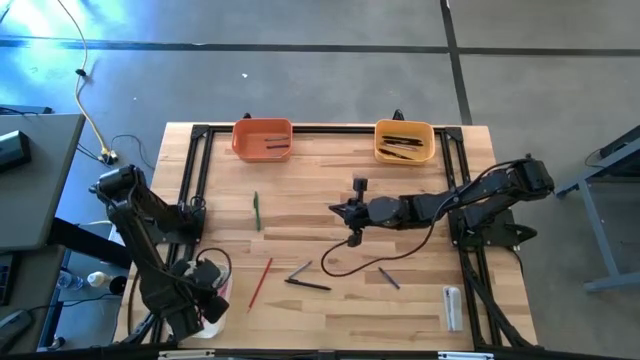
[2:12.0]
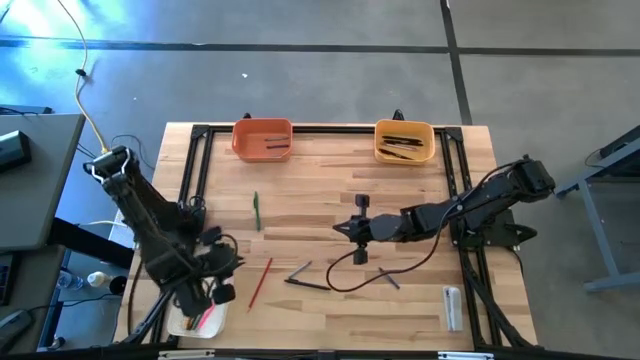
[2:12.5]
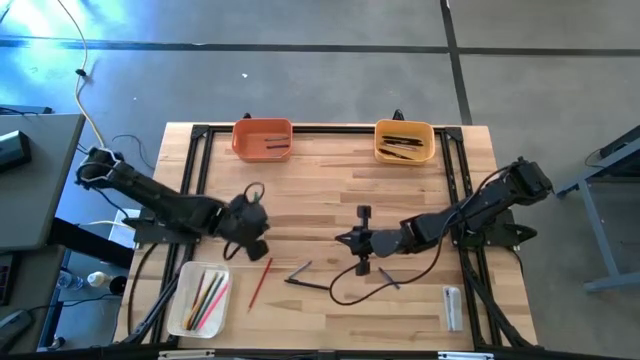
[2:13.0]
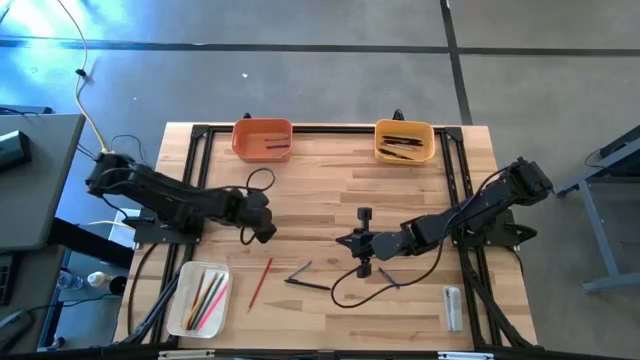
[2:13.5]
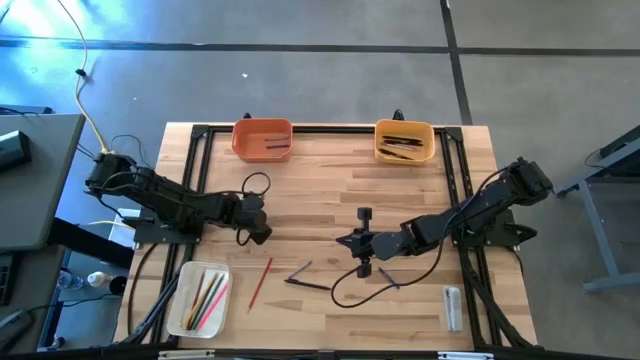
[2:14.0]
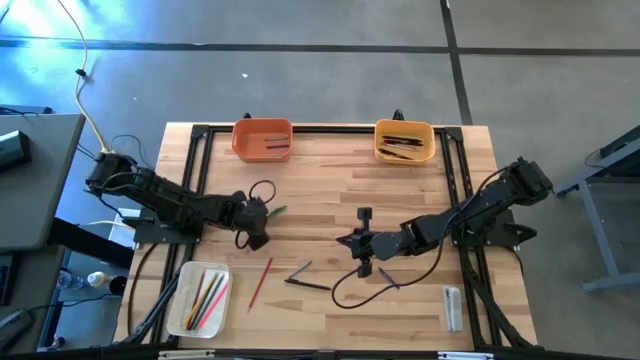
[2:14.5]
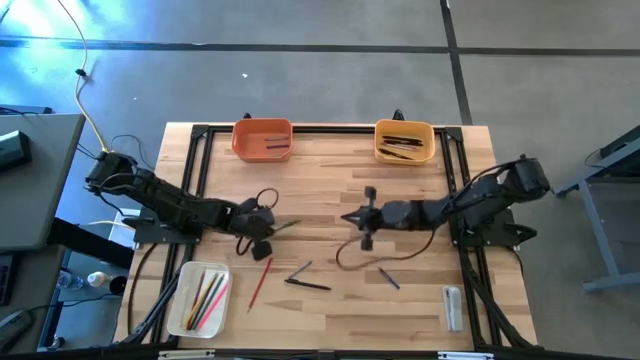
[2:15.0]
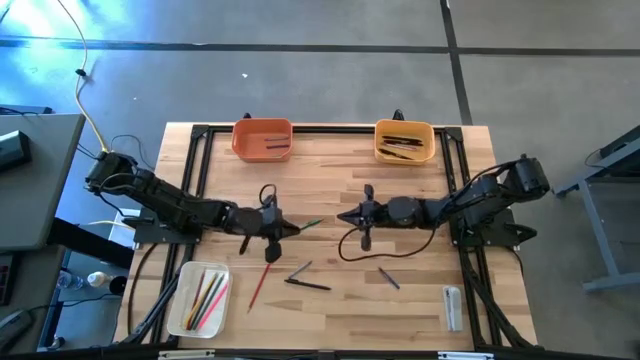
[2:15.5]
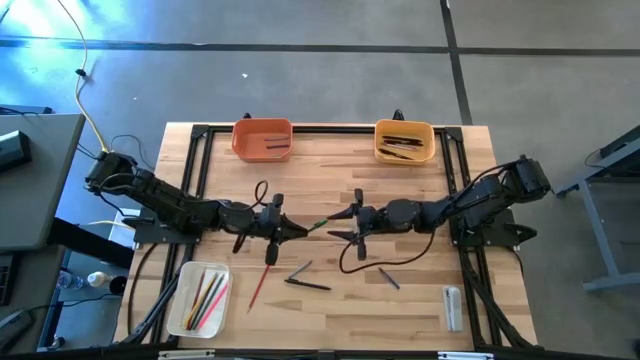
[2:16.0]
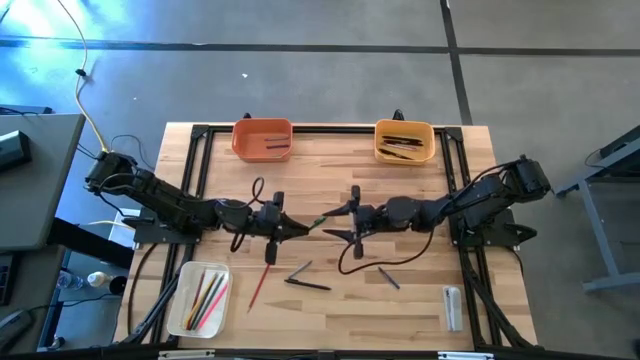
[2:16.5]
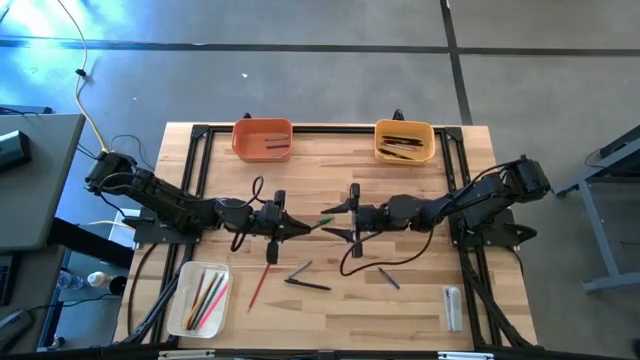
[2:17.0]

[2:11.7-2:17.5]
Task: Sort crayons/erasers/pens/pencils in bins
Put the green pen into the yellow bin

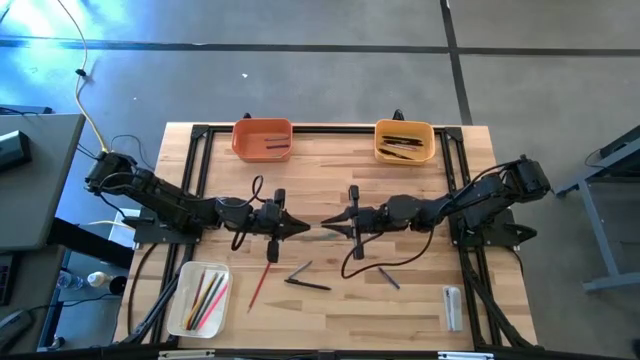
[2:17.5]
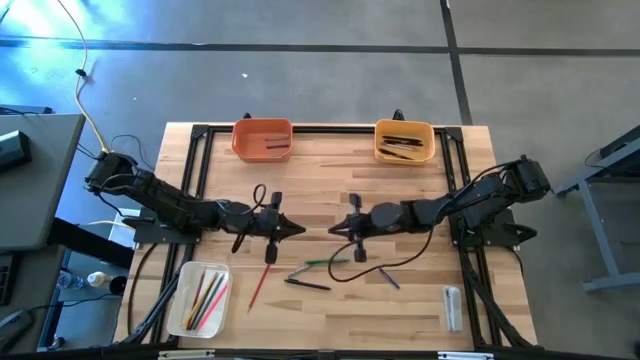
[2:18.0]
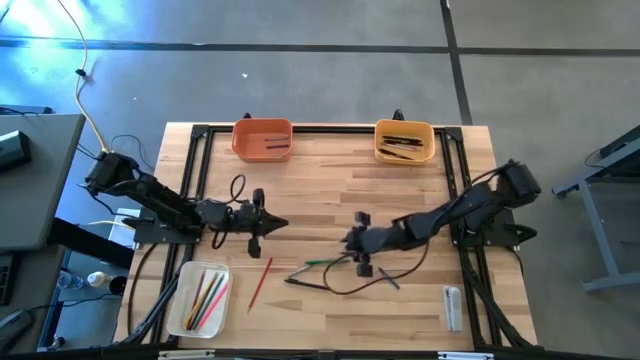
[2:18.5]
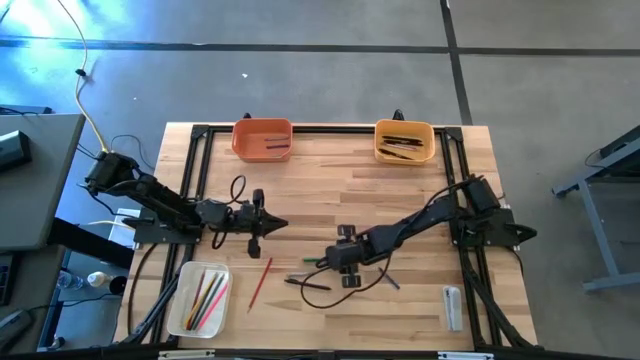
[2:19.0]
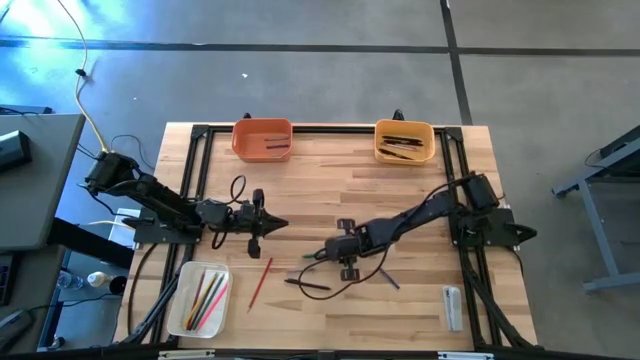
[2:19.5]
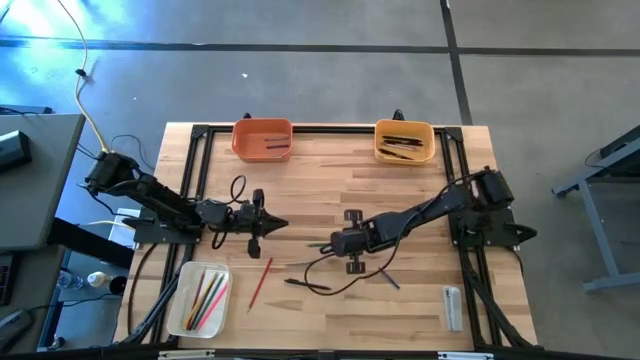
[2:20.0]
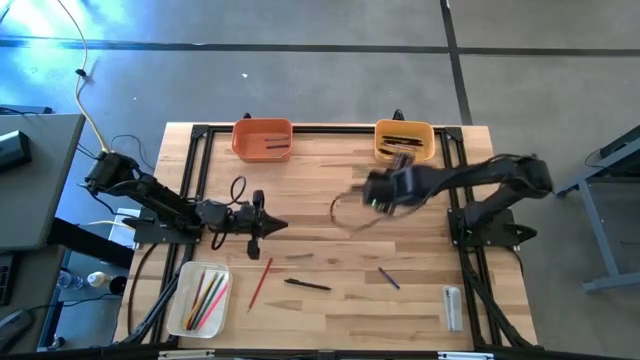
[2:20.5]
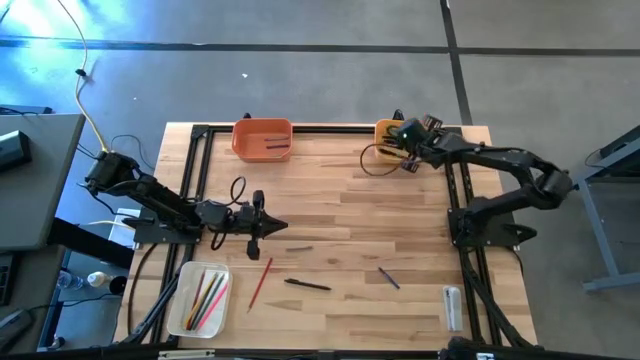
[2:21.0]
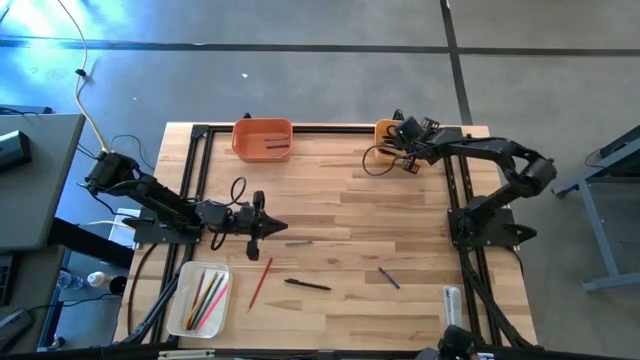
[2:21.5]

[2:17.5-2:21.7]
Put the green pen into the yellow bin

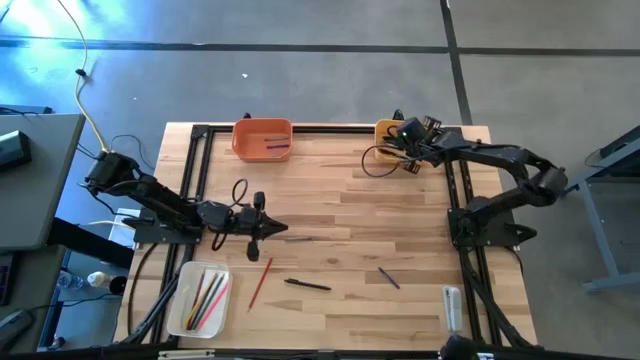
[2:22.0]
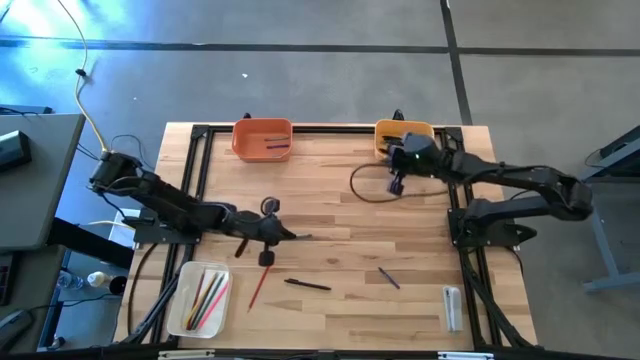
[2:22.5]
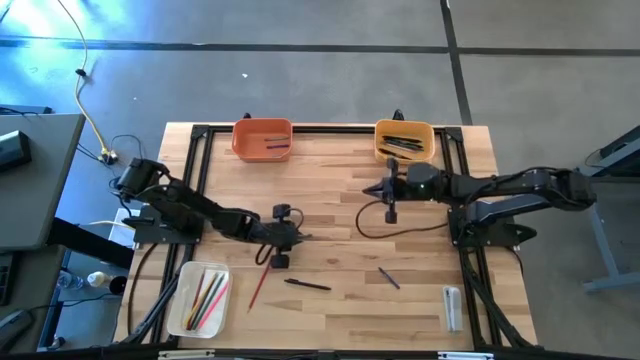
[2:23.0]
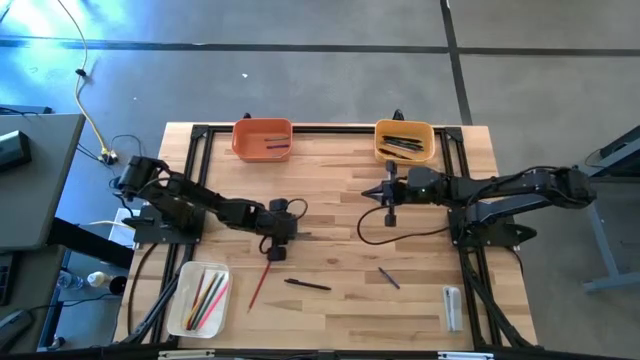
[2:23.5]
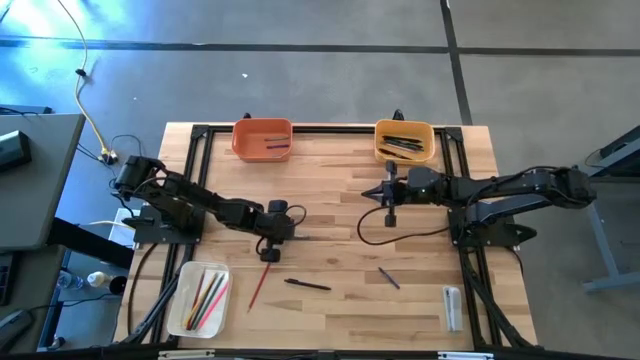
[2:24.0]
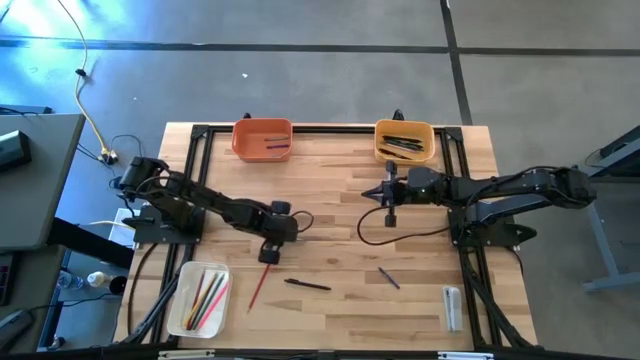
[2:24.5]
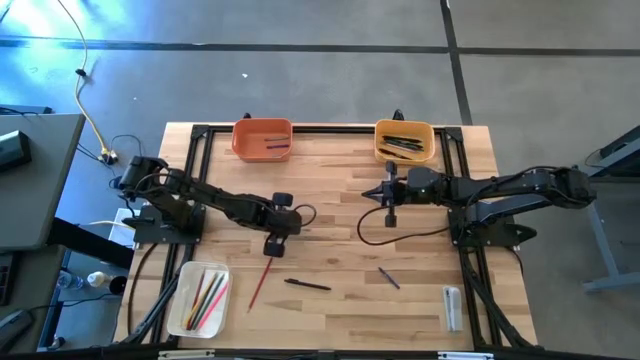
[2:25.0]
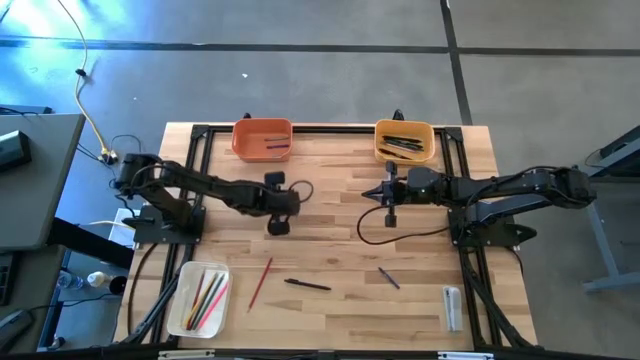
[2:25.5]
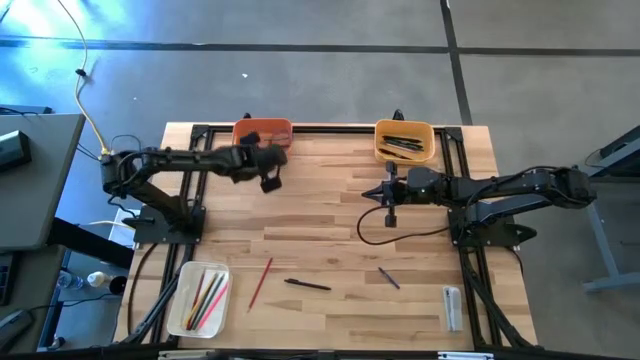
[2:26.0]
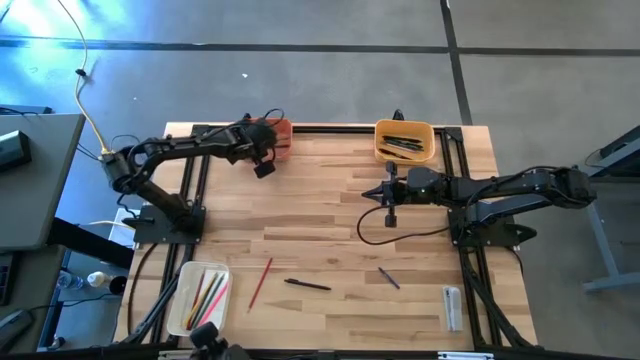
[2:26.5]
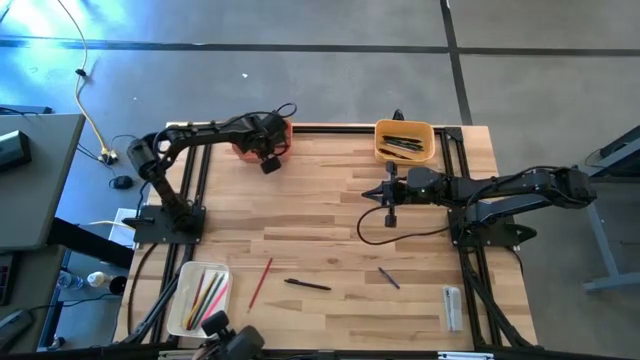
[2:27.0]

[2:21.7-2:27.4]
Put the gray crayon into the orange bin

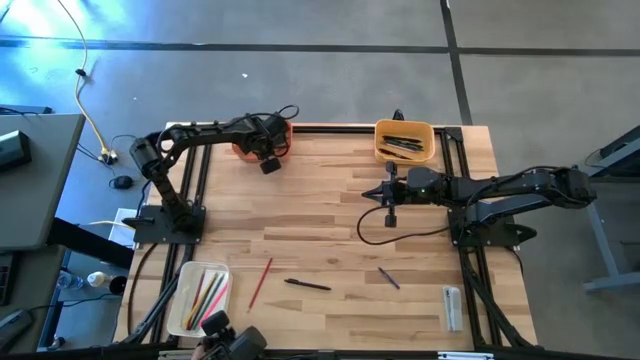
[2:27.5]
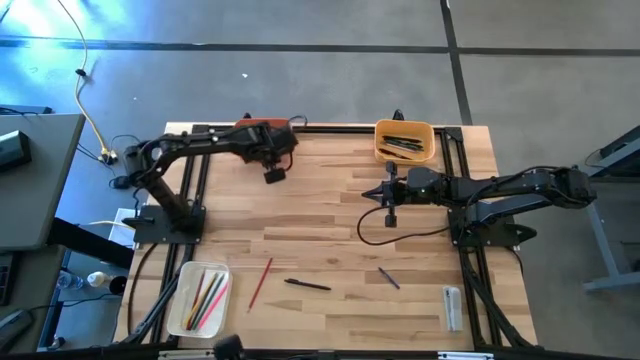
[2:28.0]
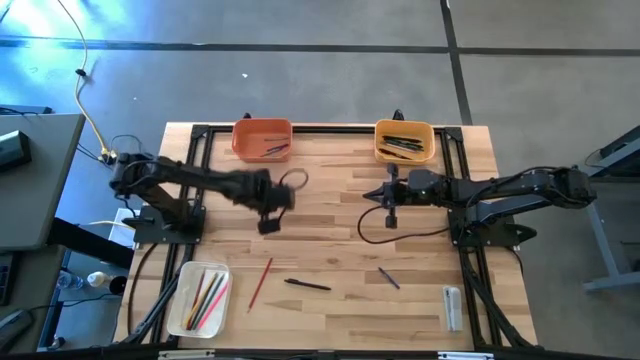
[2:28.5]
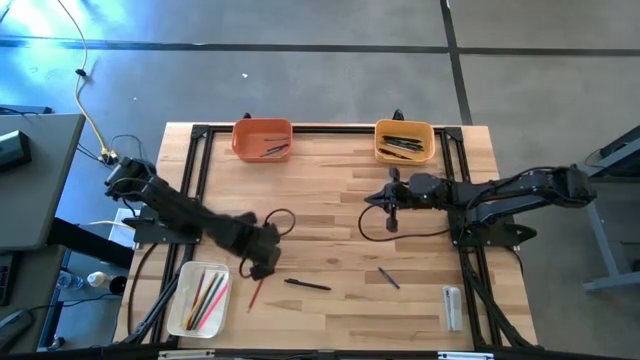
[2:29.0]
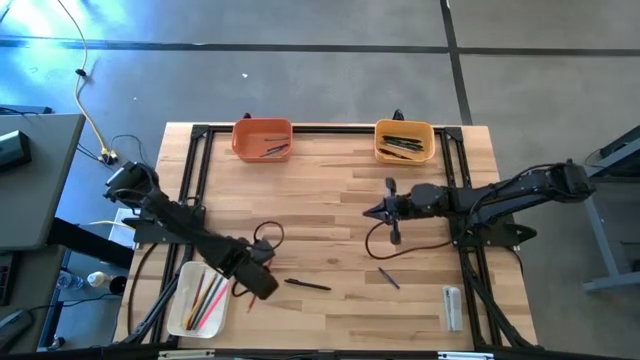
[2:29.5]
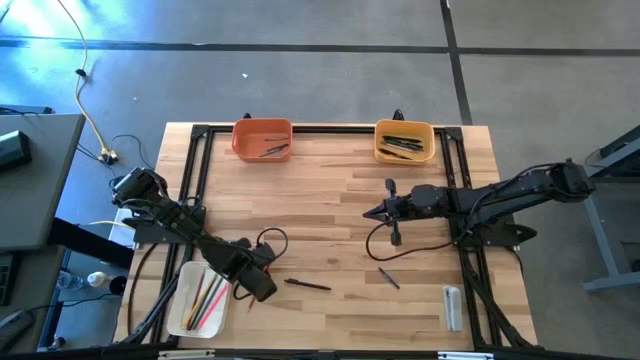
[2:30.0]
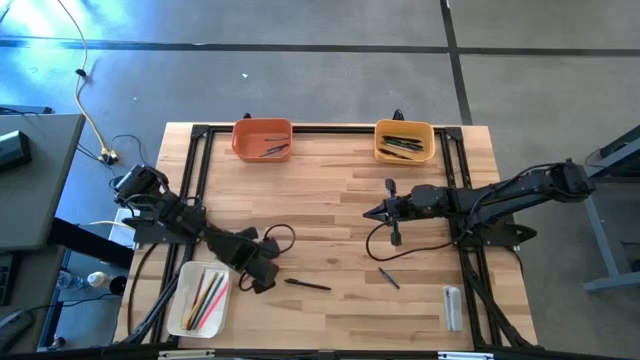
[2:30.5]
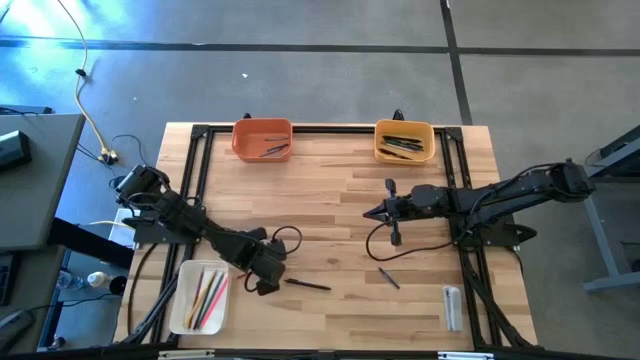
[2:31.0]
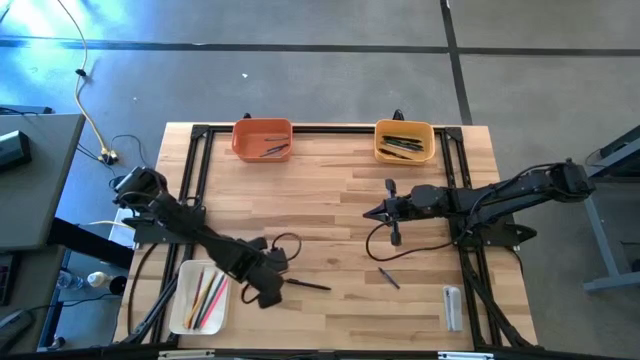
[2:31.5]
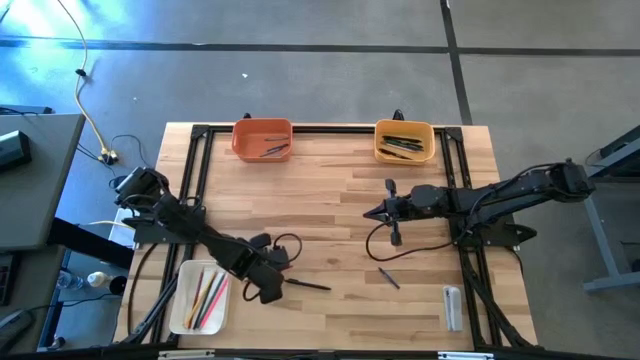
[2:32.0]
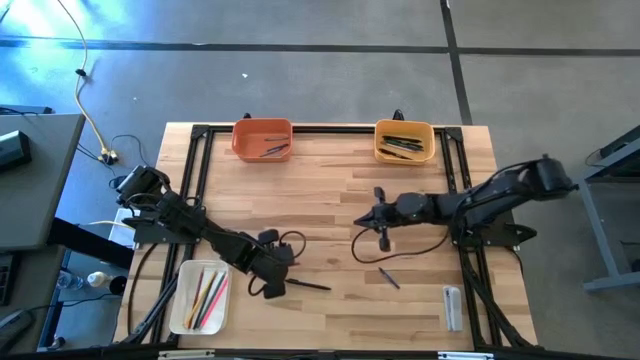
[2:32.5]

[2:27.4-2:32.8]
Put the red colored pencil into the white bin
